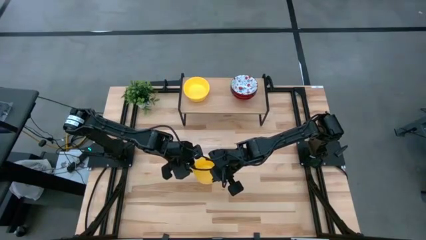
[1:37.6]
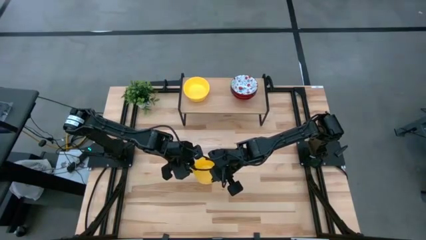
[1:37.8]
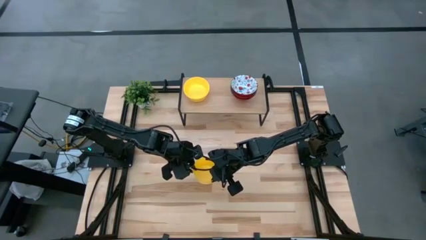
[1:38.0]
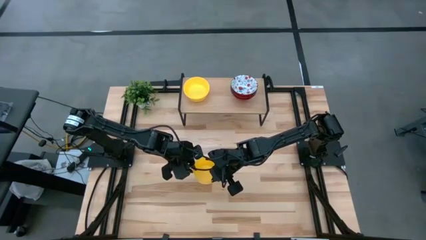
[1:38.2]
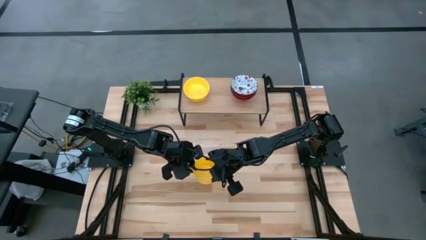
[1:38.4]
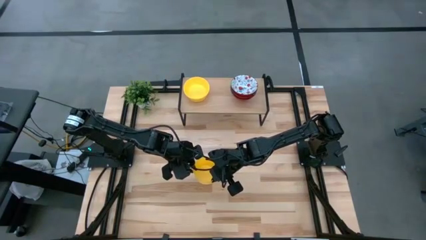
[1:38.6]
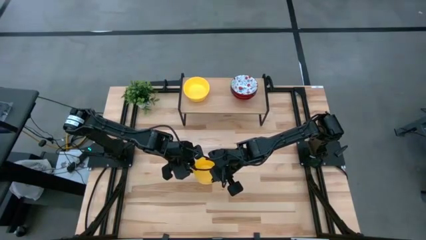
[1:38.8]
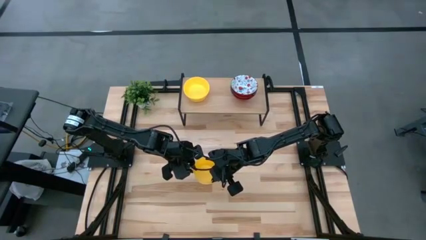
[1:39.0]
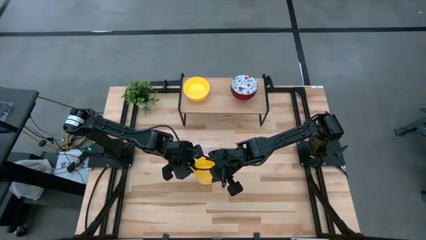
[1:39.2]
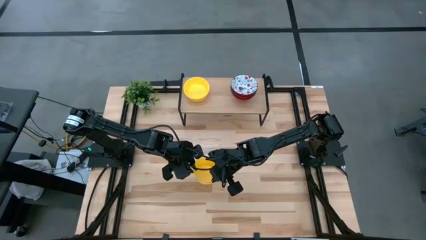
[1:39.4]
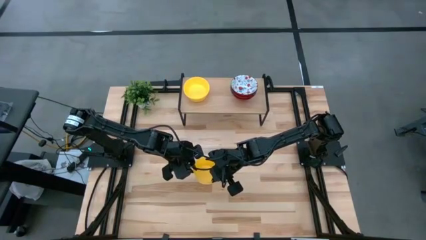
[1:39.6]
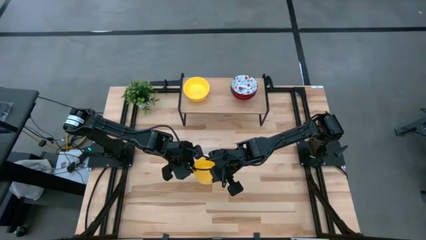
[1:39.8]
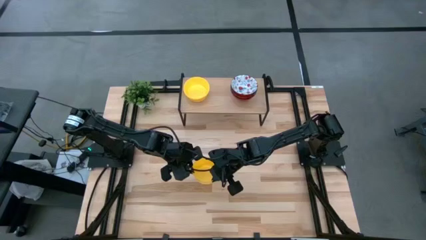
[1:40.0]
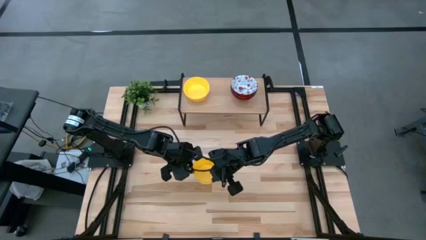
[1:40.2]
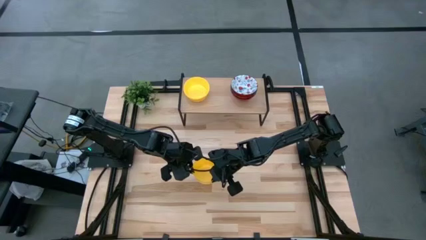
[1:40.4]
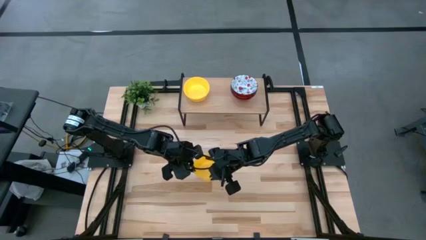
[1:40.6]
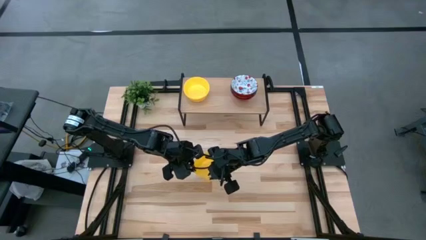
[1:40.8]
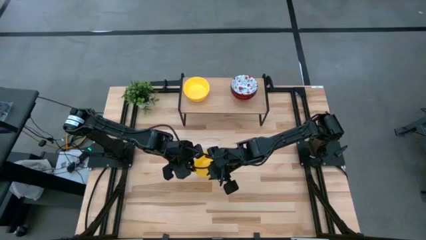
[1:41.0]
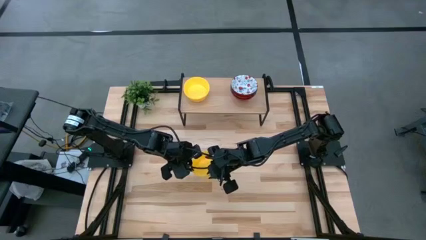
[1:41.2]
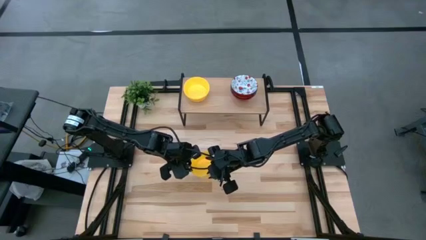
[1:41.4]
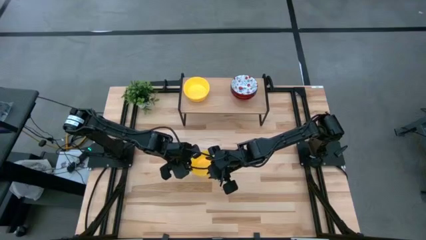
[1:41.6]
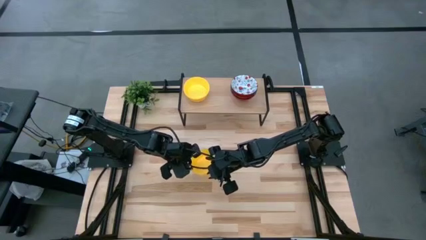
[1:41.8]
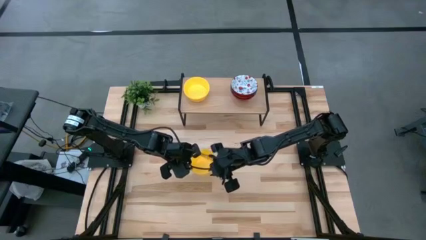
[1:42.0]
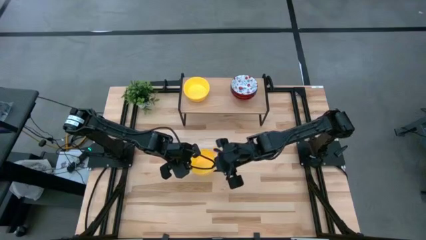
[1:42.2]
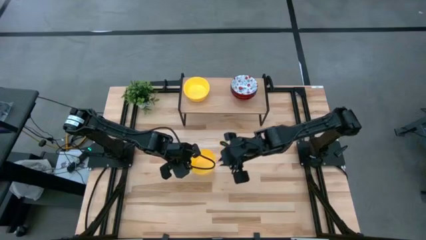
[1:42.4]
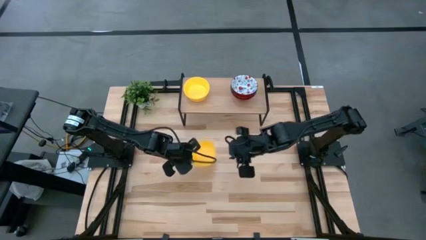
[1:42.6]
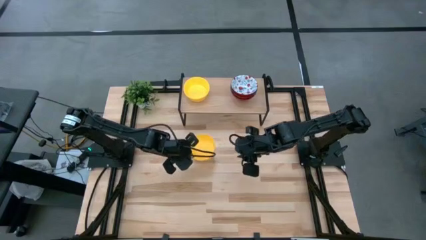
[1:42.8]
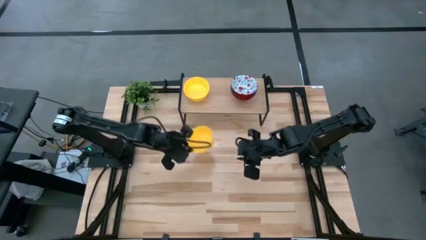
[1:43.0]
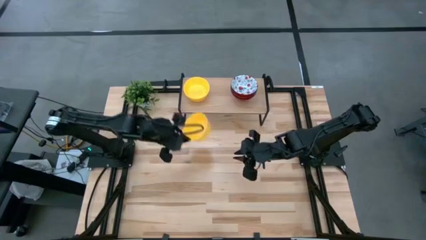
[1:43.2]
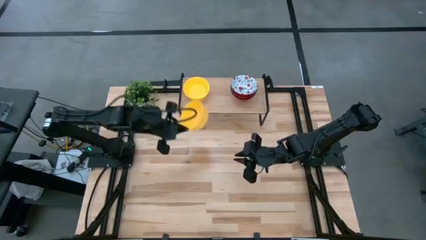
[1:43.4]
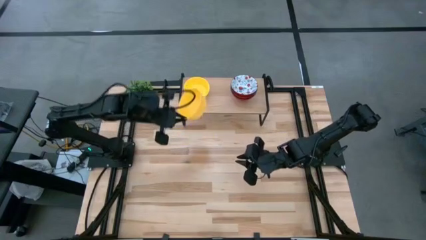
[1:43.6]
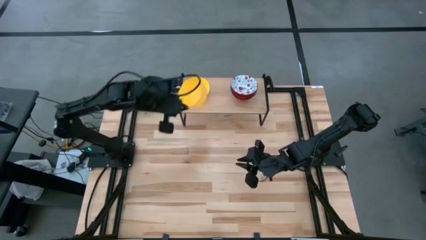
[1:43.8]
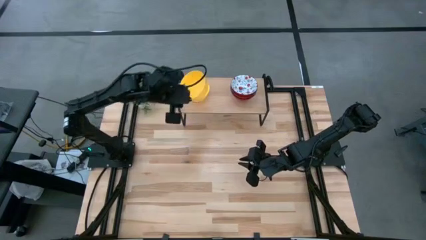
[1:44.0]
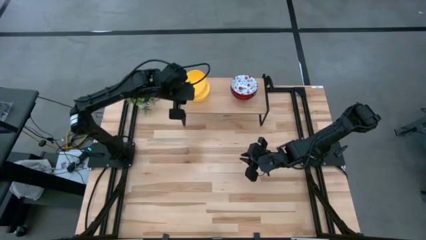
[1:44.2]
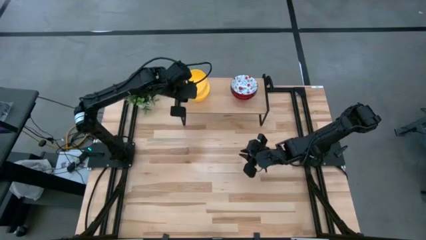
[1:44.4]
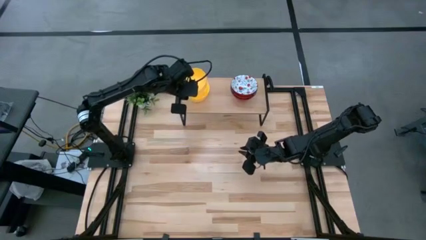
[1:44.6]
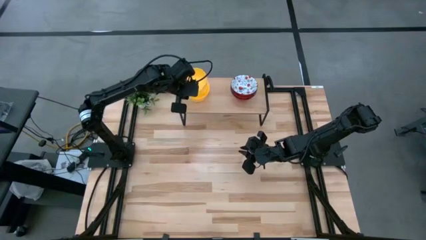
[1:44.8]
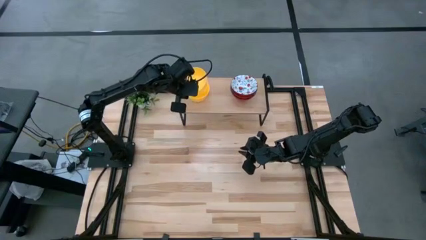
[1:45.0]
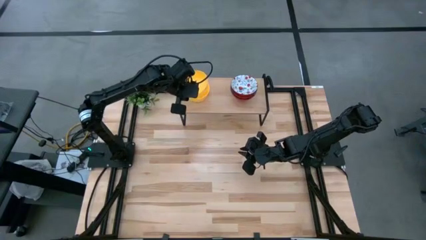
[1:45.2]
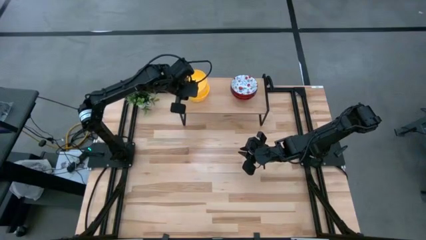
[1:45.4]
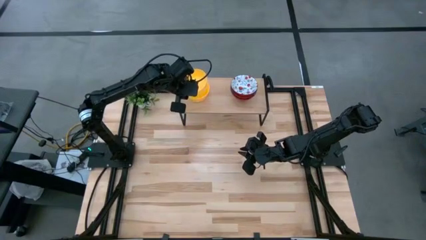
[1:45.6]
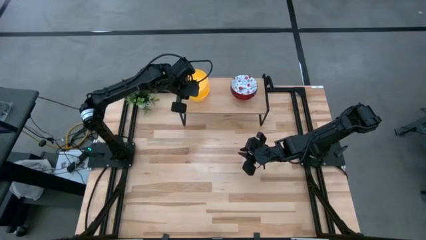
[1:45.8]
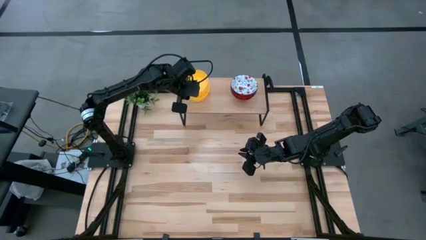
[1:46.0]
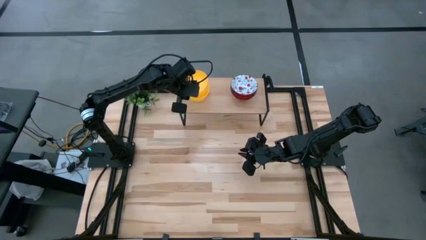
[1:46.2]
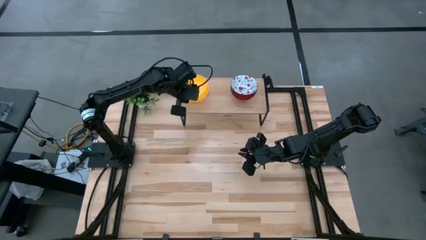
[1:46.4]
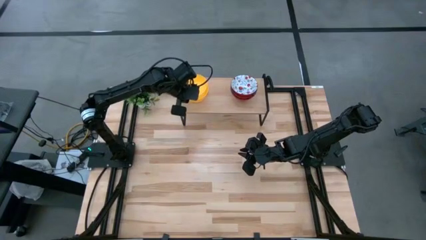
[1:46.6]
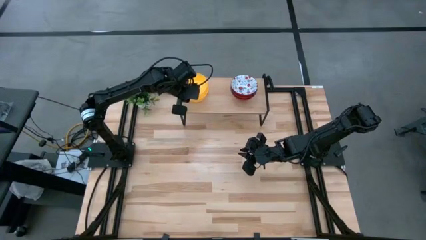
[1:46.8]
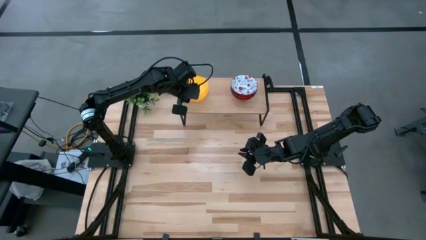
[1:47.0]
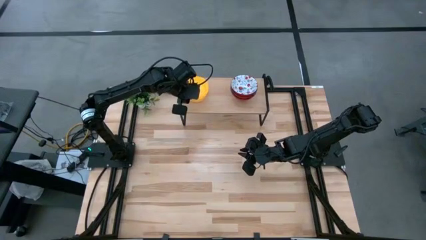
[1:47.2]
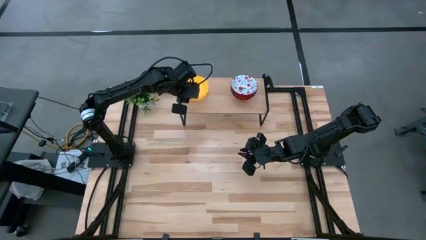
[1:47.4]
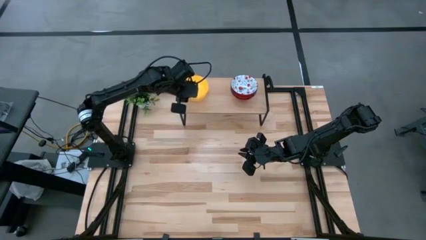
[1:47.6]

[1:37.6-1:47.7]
Task: Pick & Place Mini bowls
Stack the yellow bowl on top of the yellow bowls on the shelf

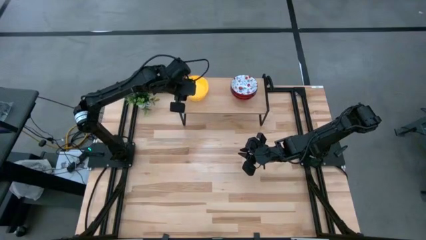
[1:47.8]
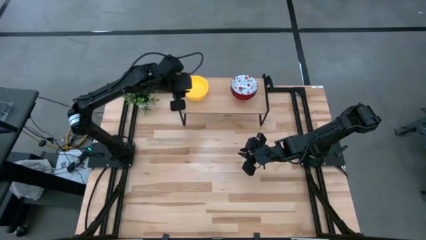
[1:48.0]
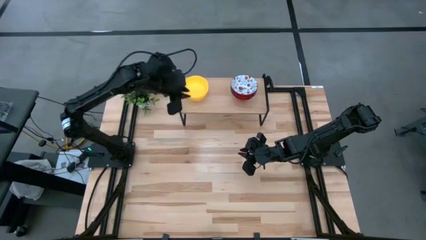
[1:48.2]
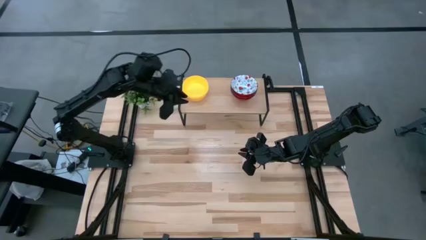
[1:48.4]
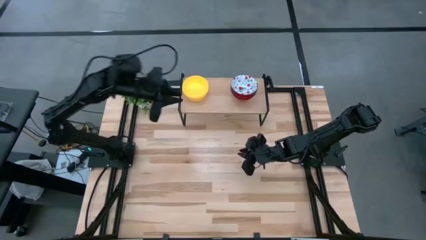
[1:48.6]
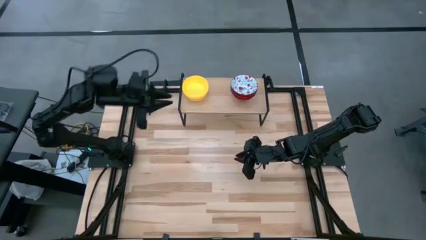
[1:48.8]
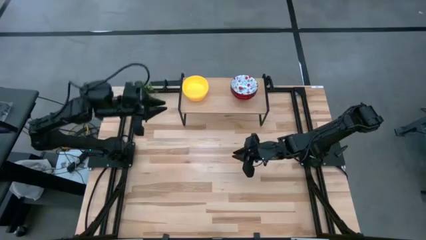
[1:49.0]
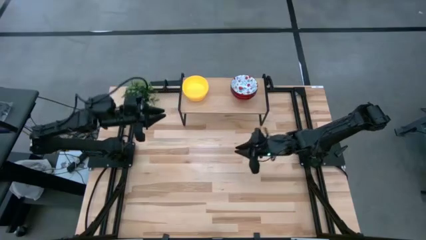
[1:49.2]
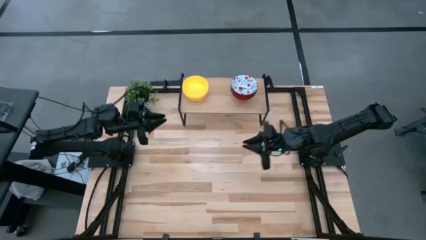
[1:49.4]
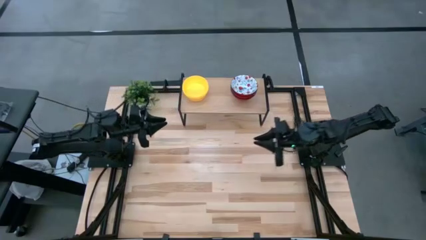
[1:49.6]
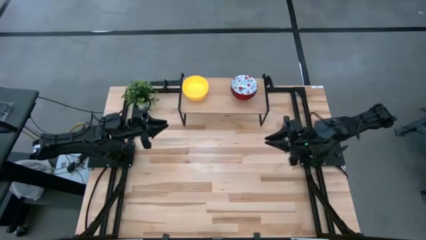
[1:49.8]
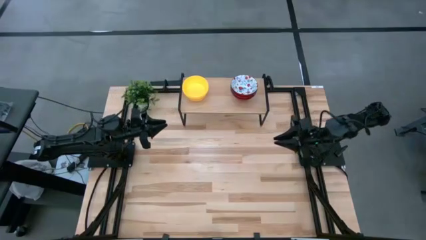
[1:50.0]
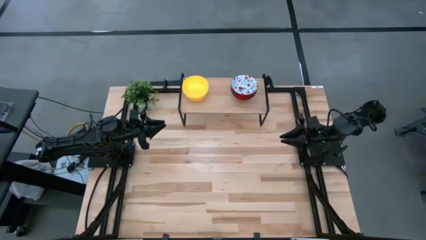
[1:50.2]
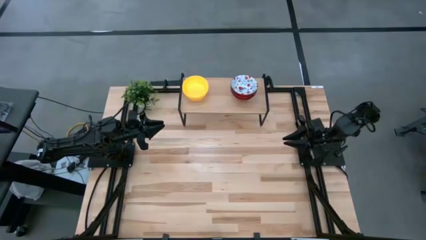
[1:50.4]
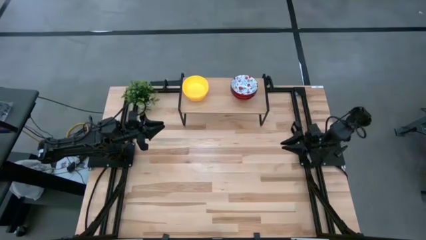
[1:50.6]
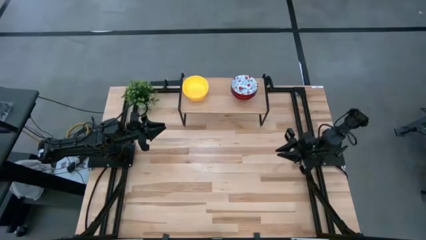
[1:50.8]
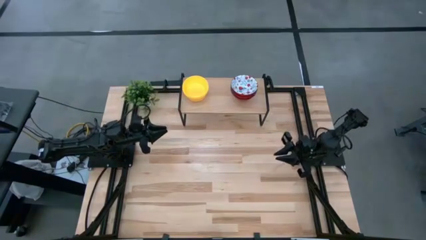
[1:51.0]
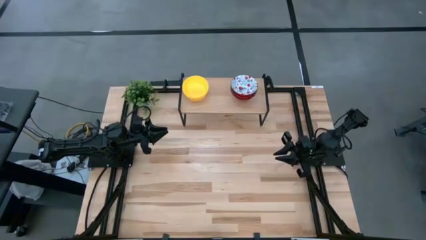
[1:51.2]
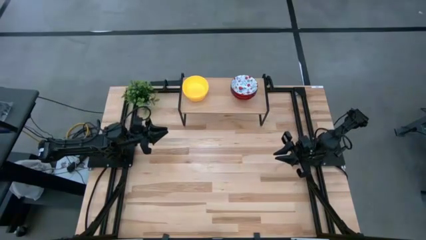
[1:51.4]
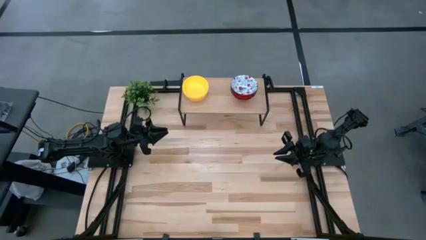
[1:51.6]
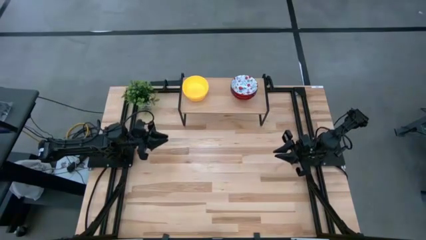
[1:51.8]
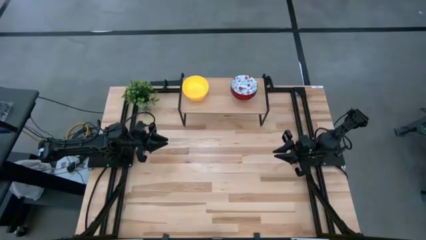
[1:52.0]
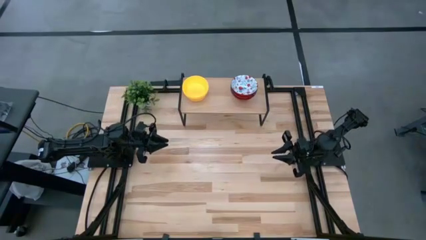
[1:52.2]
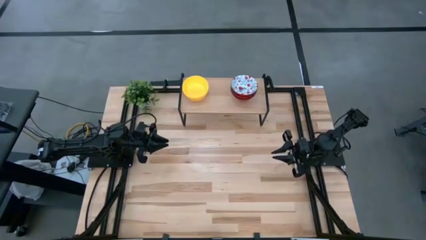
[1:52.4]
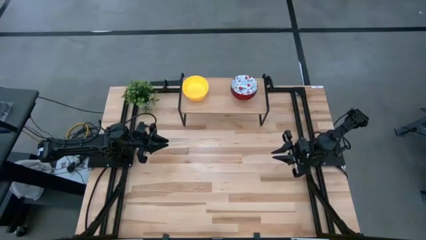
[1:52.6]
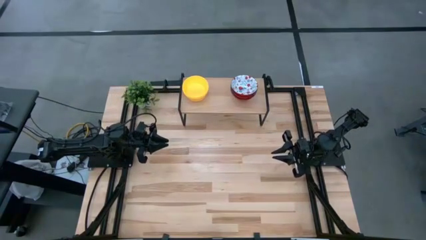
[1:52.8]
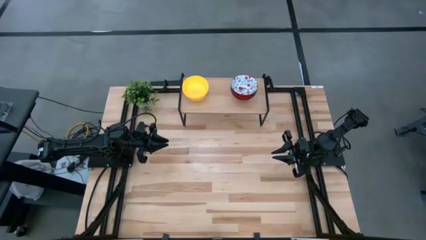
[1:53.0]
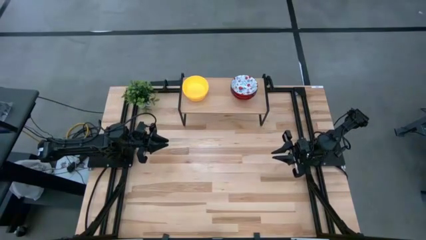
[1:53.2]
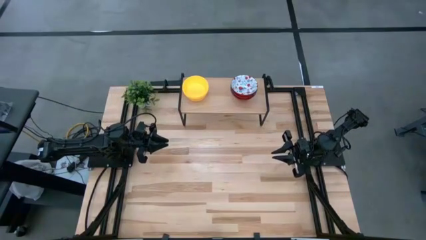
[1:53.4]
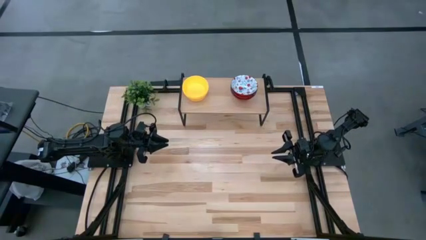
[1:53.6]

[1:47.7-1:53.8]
Return to Home Position
